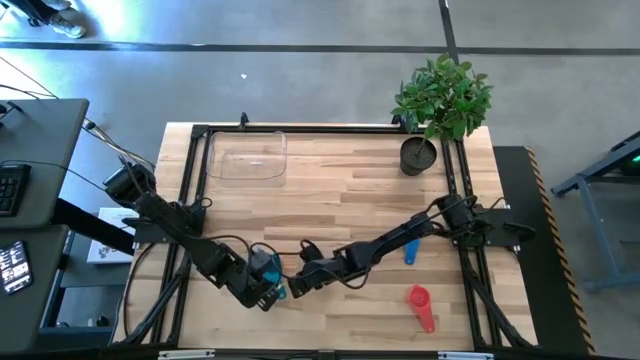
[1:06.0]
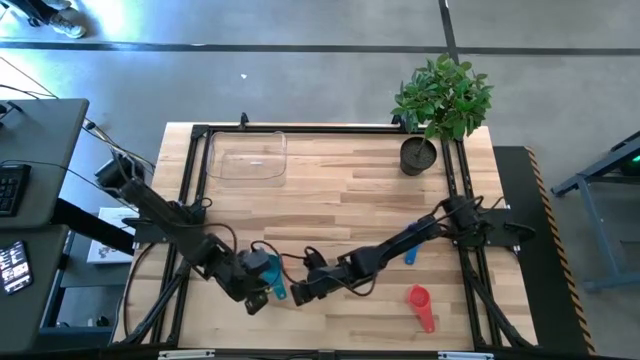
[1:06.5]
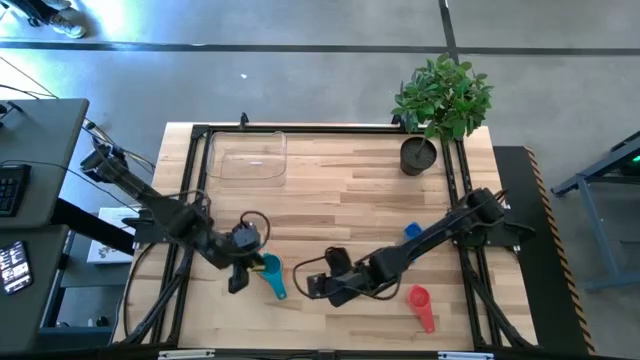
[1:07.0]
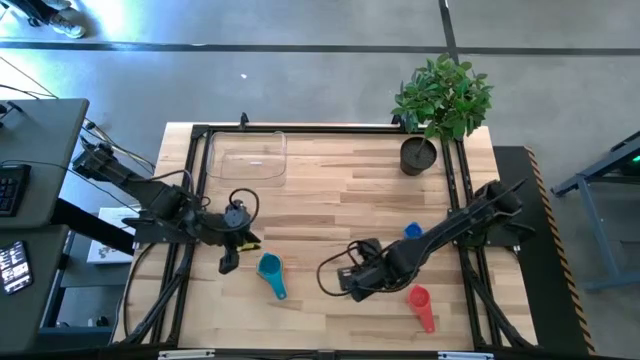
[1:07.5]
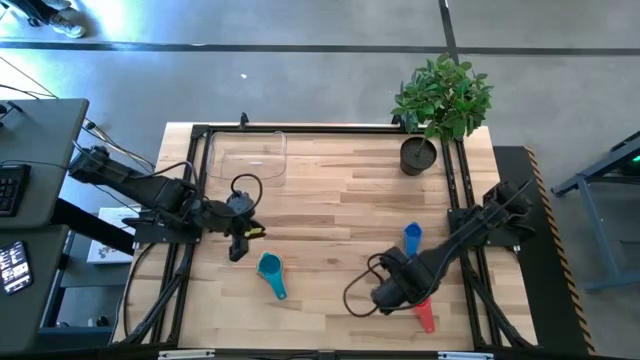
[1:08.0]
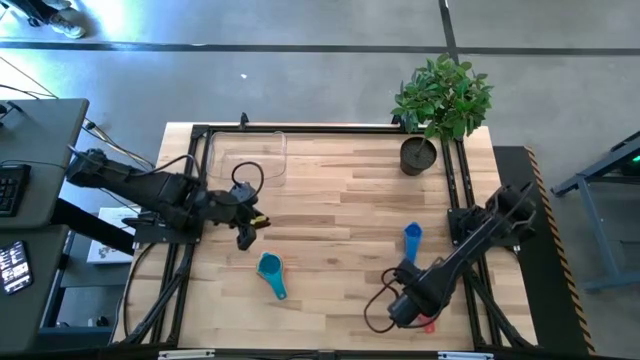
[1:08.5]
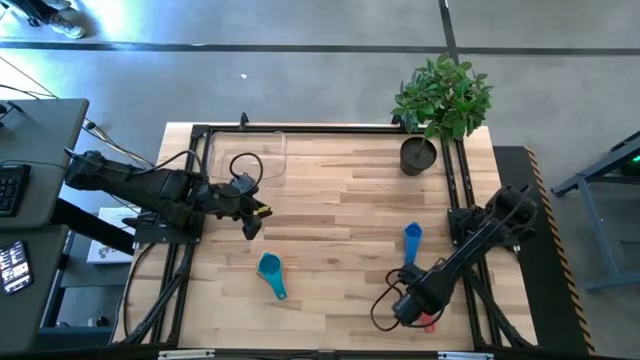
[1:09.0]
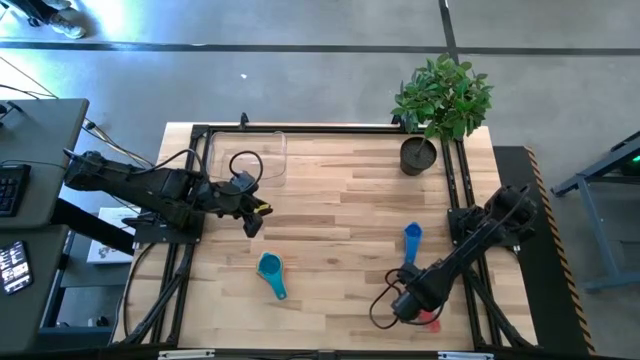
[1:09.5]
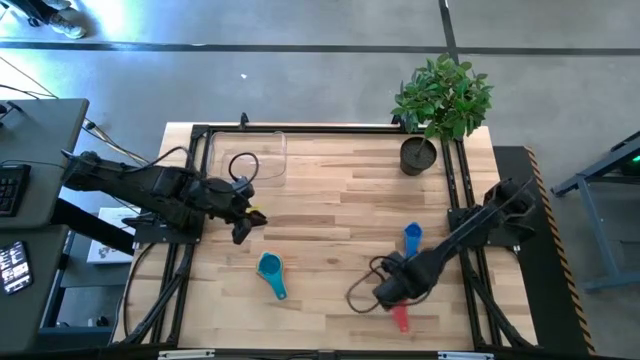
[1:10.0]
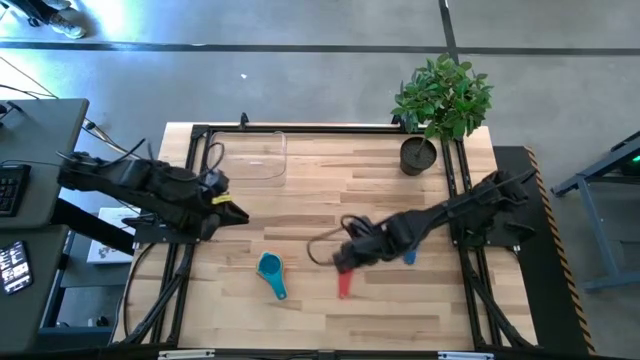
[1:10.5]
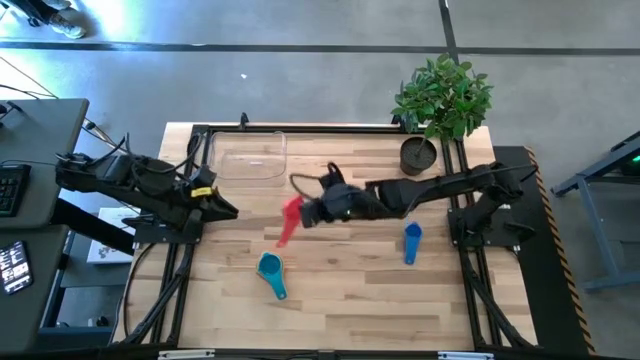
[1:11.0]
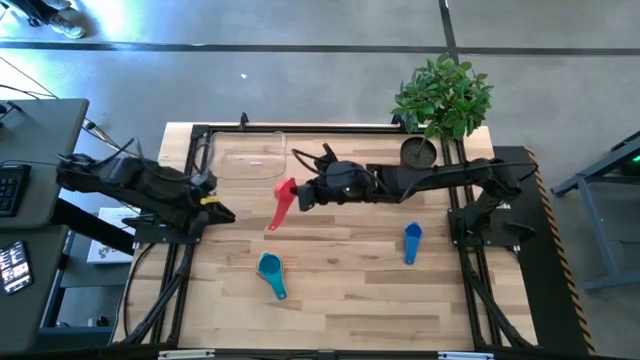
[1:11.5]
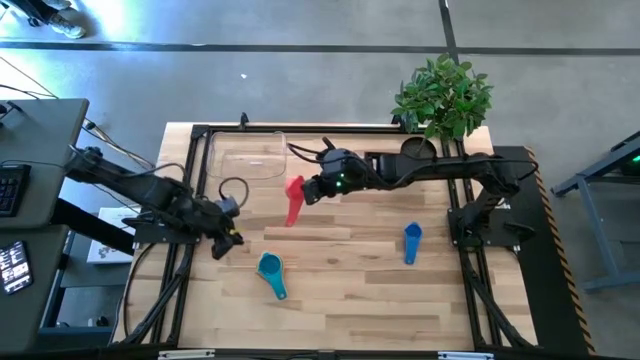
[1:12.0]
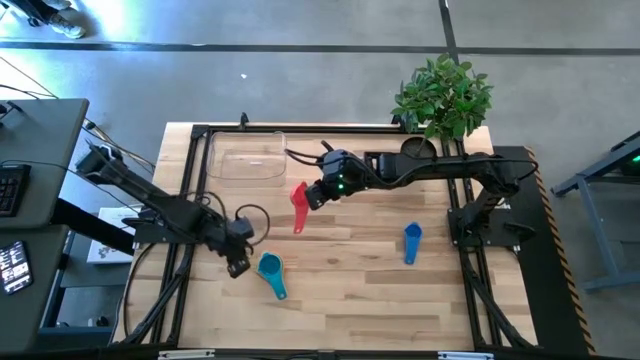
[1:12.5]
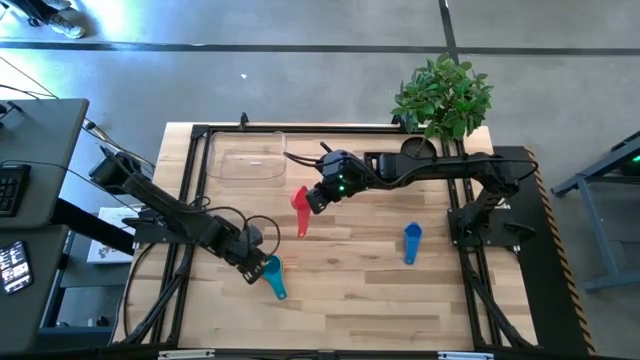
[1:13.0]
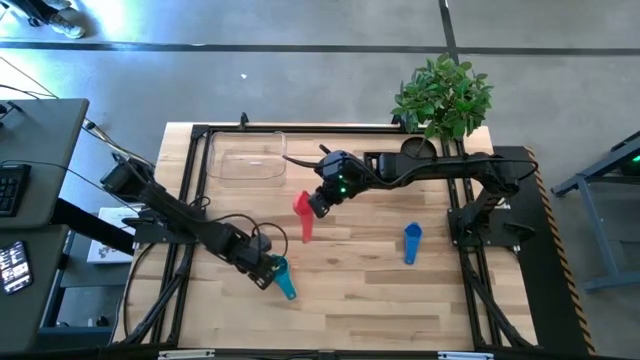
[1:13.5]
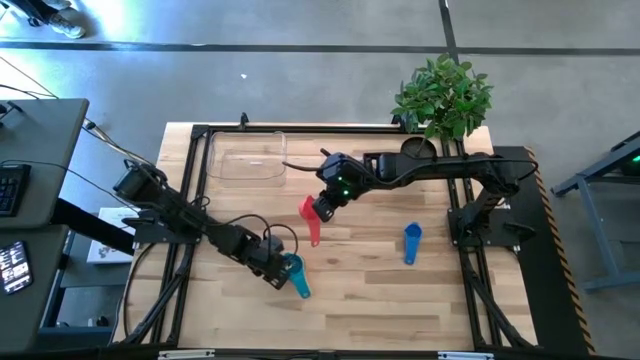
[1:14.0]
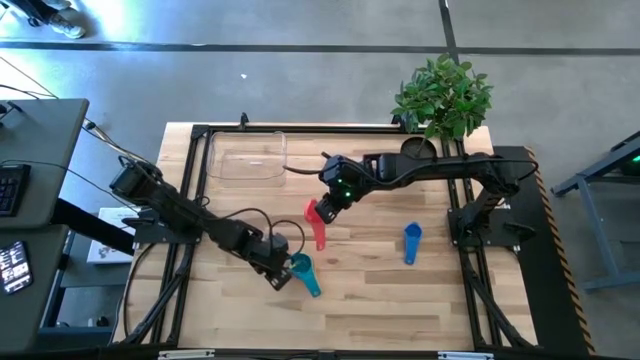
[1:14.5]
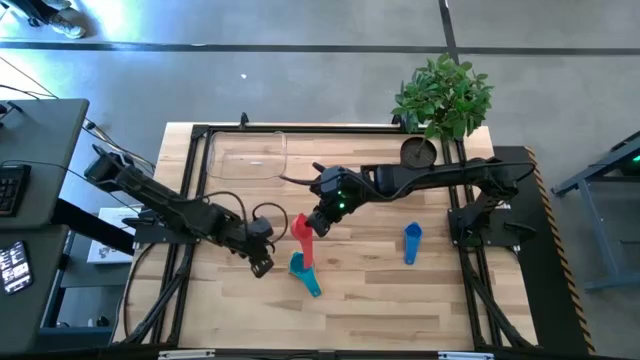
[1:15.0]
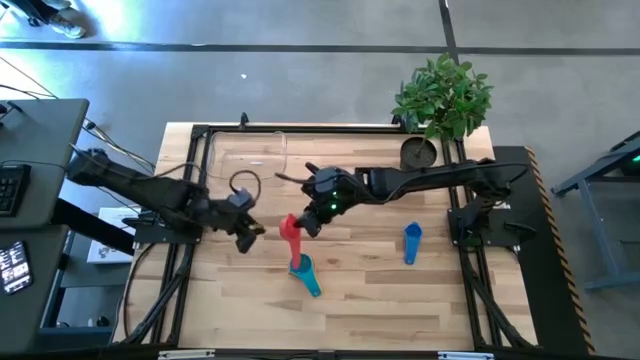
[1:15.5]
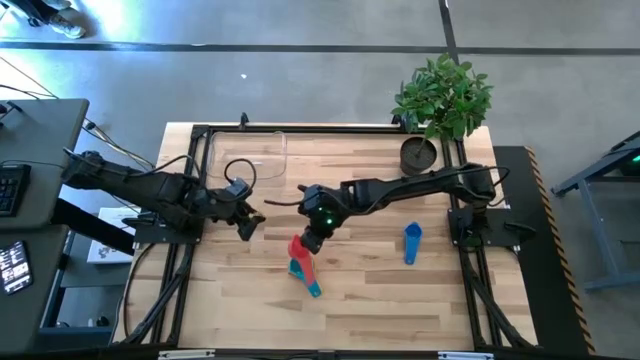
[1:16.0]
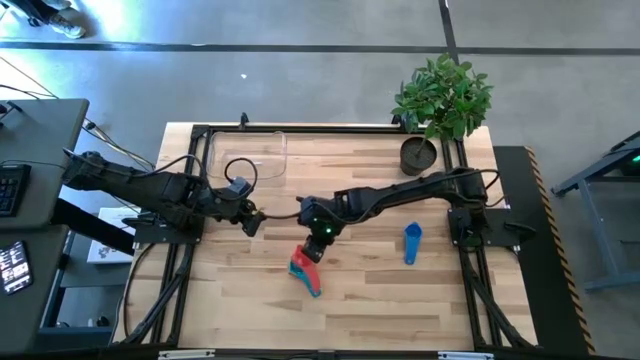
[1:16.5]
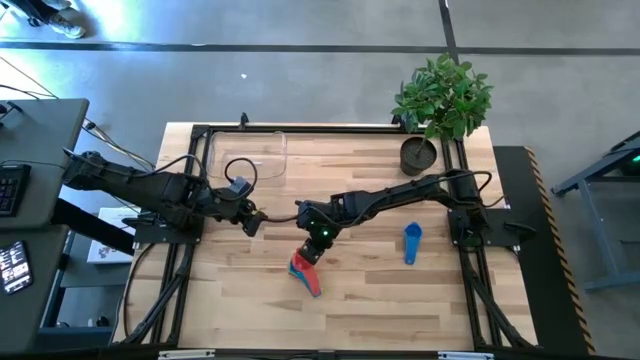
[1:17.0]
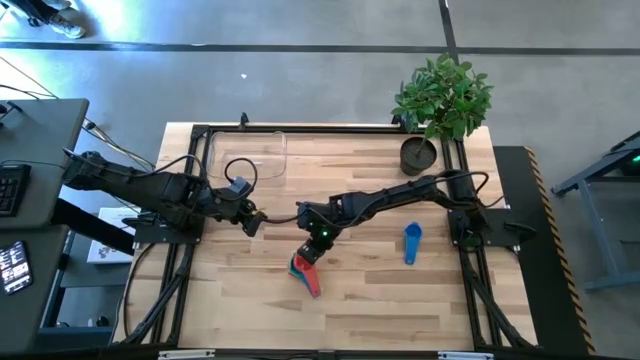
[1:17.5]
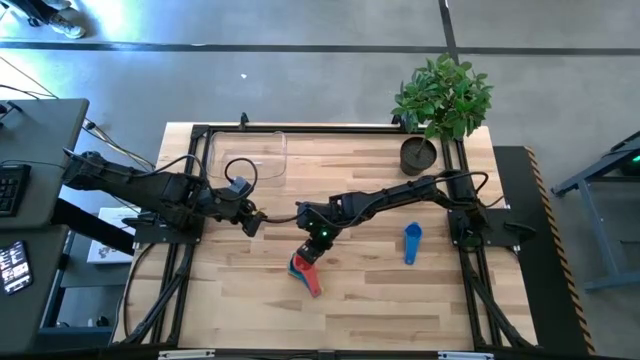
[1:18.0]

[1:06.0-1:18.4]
Task: Nest measuring cups in basket
Stack the red measuring cup on top of the light blue measuring cup

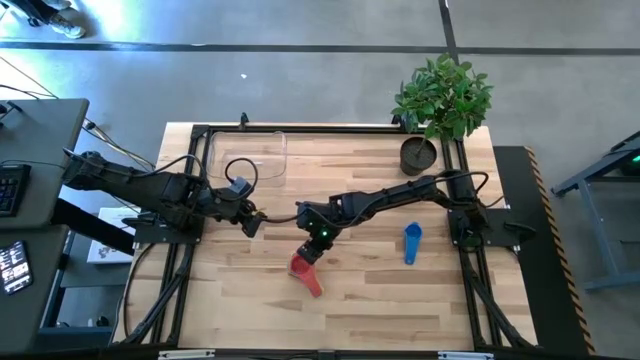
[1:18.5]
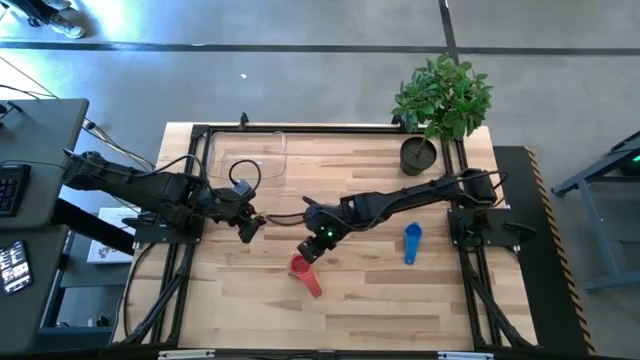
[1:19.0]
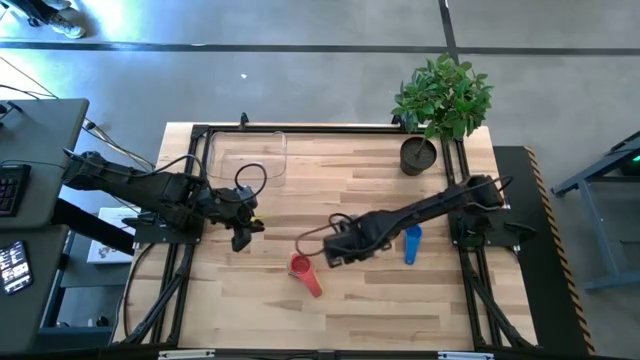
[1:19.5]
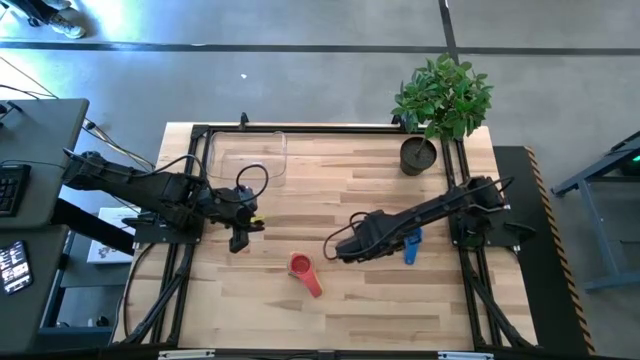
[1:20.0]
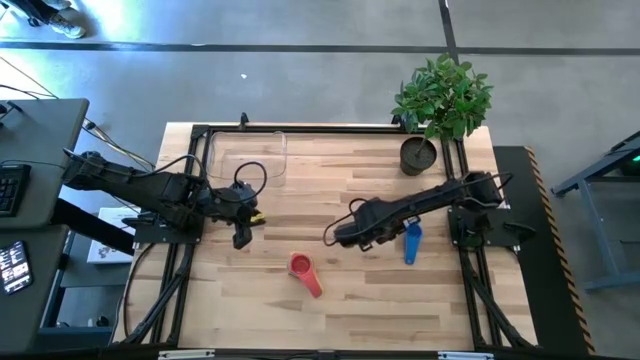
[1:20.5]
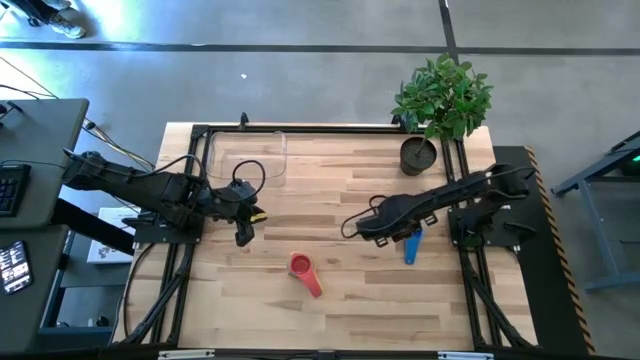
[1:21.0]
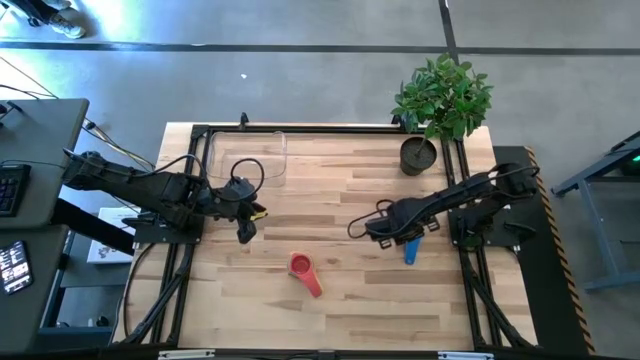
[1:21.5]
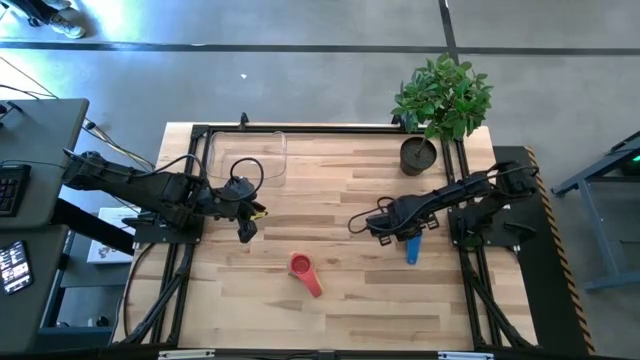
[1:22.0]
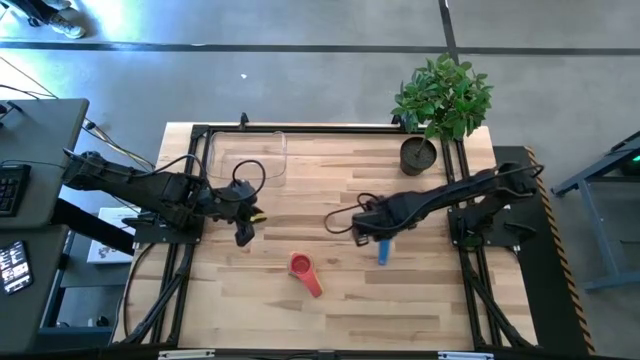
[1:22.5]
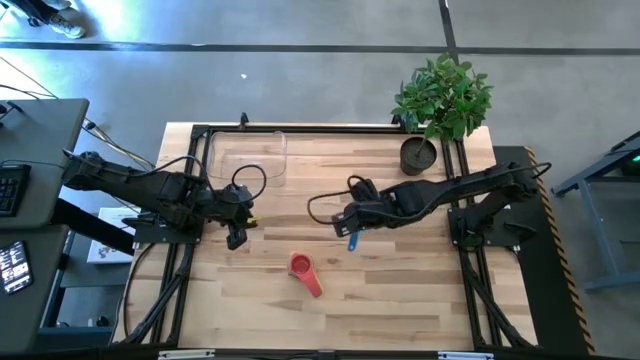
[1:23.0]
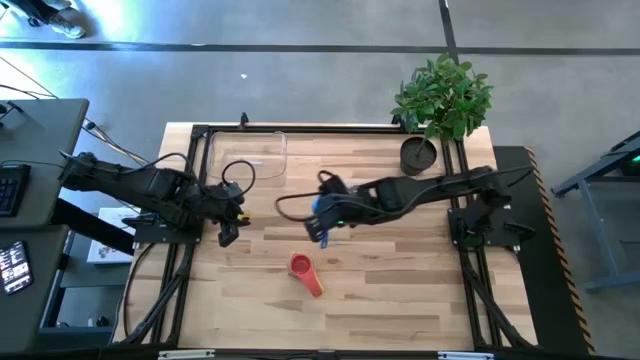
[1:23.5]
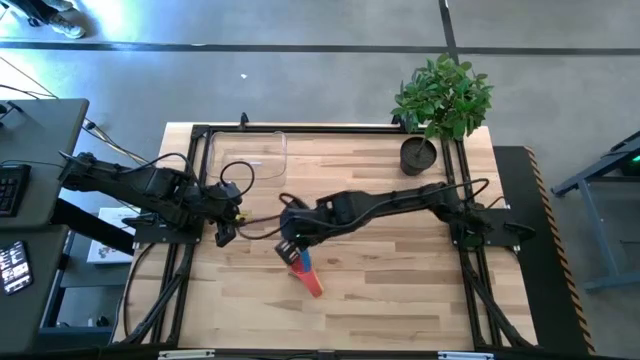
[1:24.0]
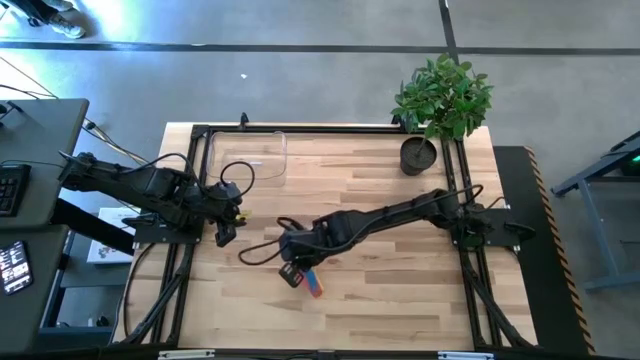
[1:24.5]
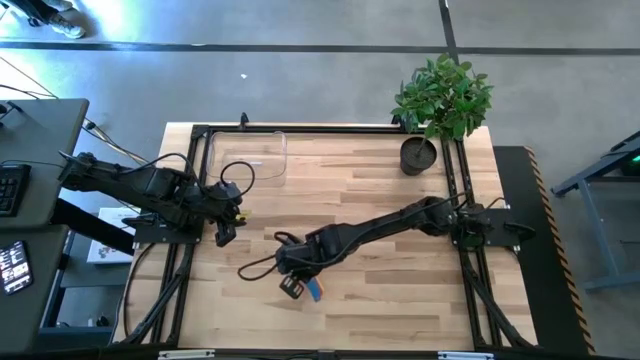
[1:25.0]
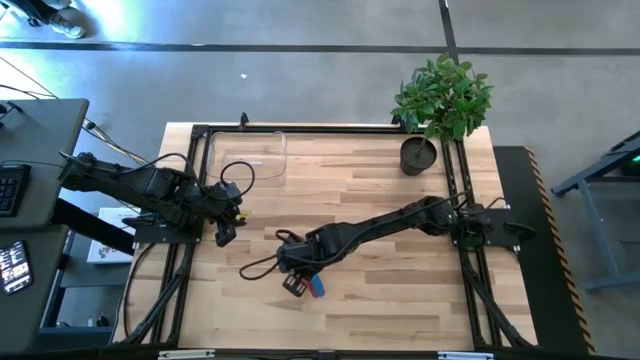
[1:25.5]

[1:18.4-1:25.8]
Stack the blue measuring cup on top of the red measuring cup

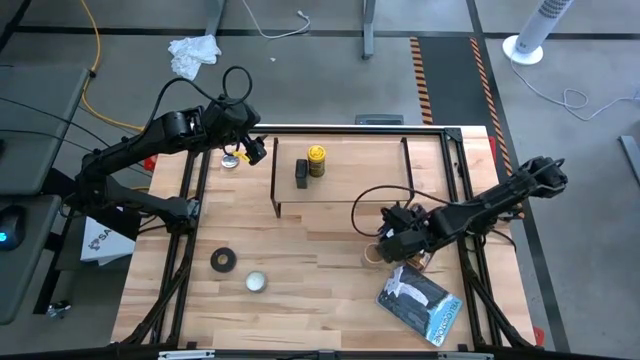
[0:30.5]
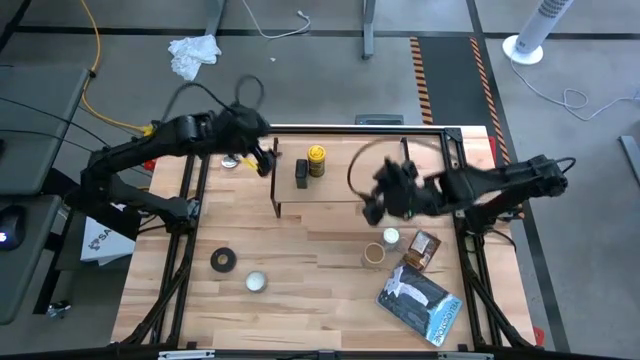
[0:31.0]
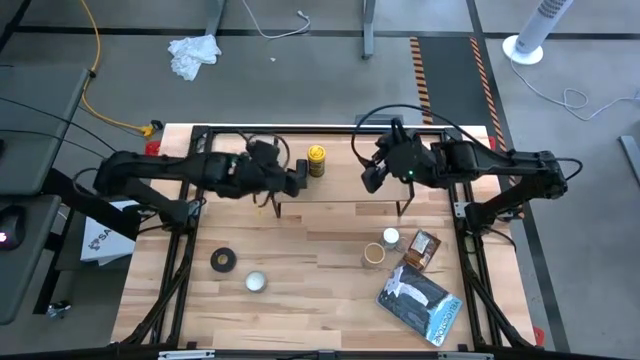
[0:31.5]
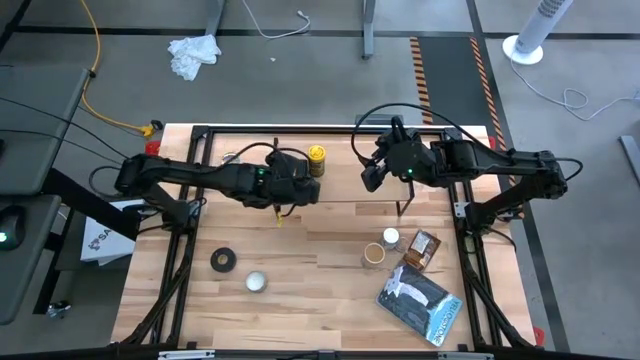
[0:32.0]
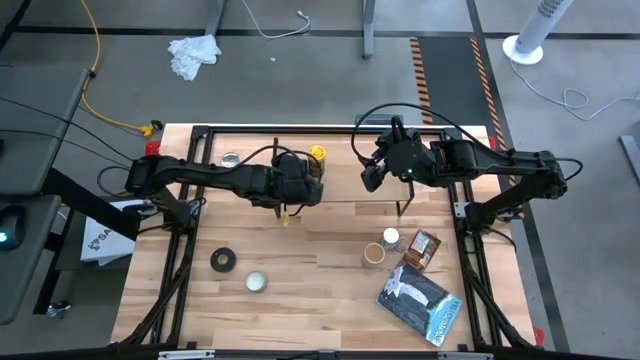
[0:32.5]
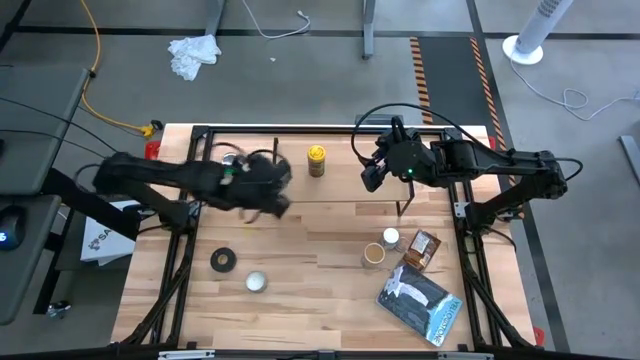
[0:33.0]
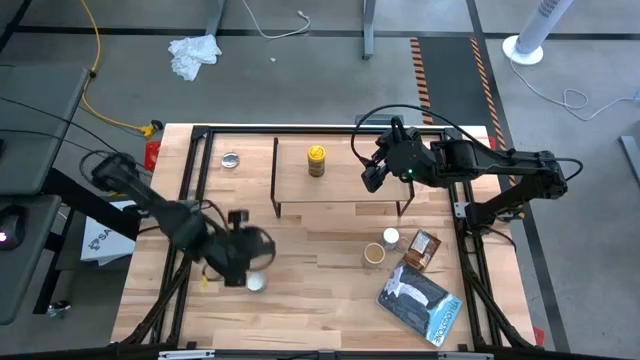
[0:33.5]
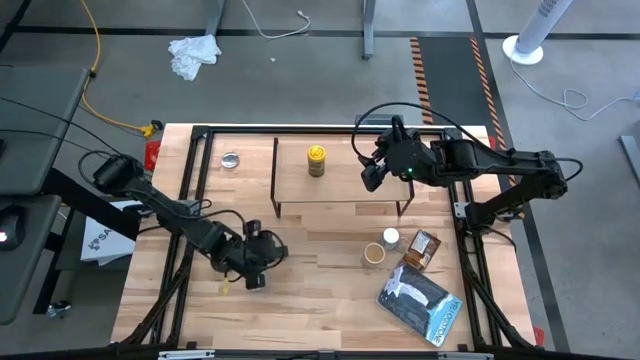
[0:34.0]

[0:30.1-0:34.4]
Task: Shelf spices
Remove the black seasoning can from the shelf
